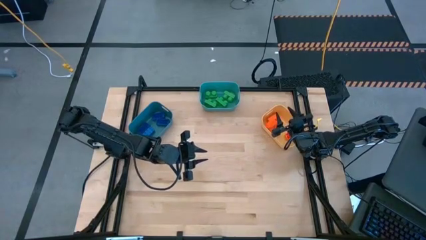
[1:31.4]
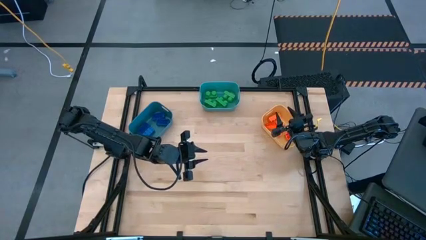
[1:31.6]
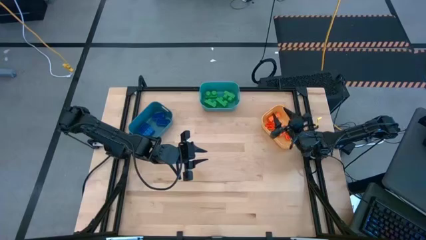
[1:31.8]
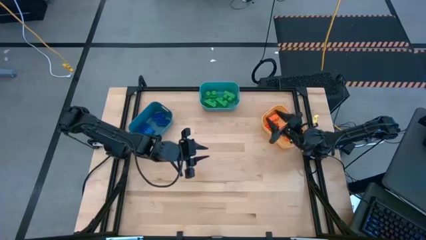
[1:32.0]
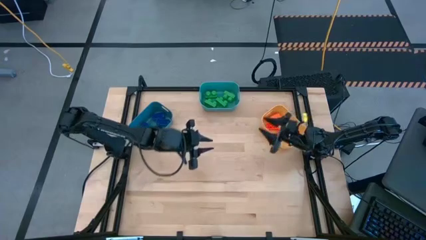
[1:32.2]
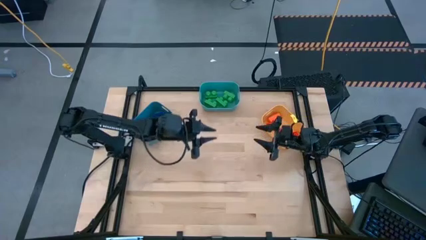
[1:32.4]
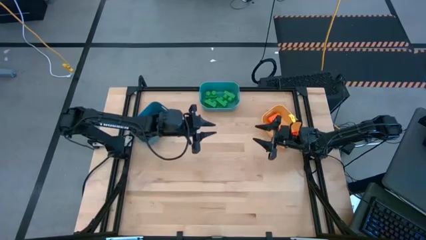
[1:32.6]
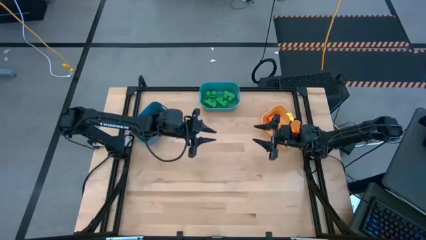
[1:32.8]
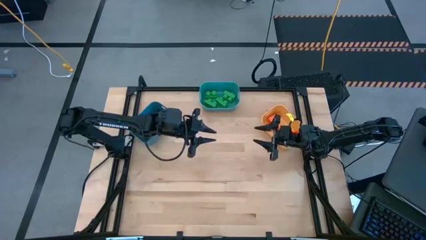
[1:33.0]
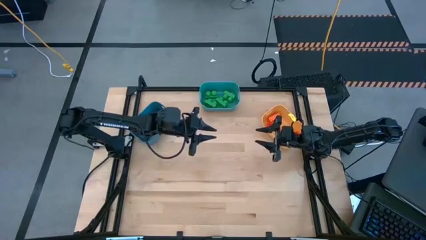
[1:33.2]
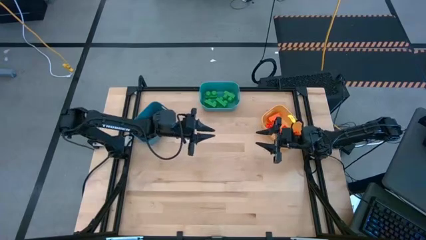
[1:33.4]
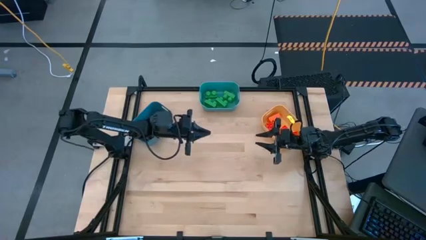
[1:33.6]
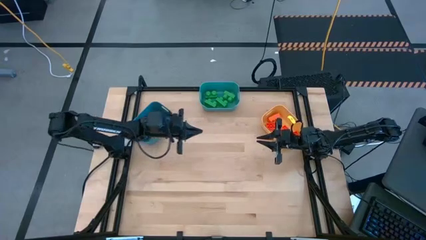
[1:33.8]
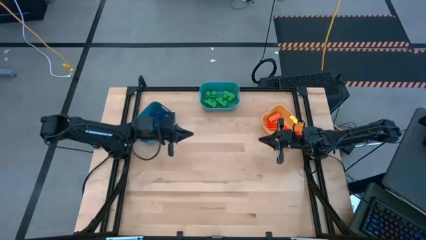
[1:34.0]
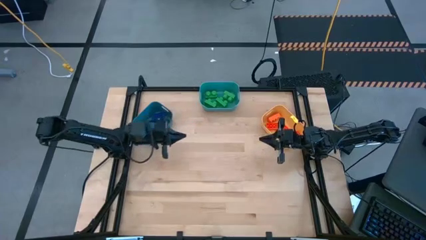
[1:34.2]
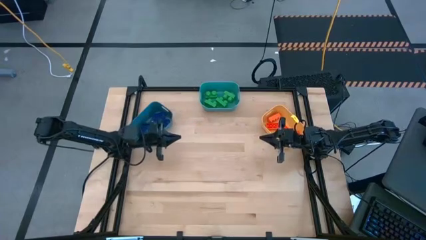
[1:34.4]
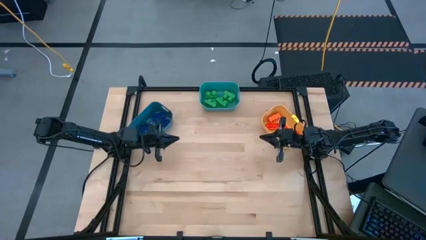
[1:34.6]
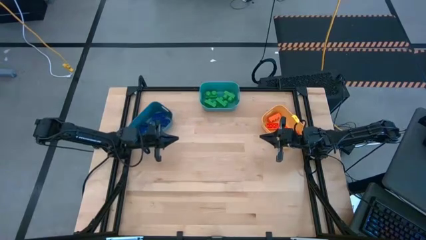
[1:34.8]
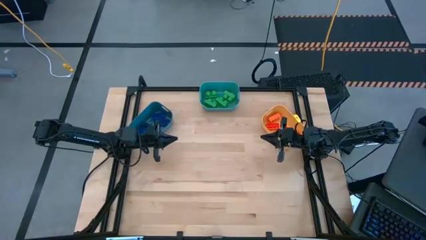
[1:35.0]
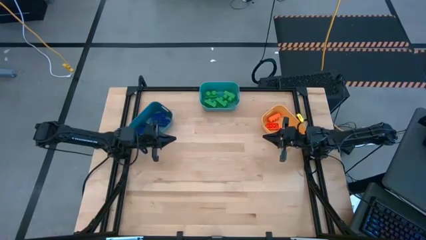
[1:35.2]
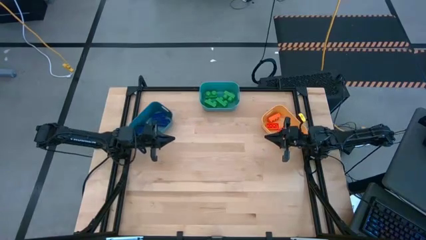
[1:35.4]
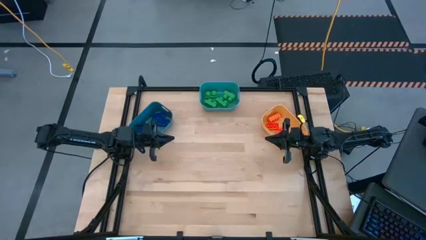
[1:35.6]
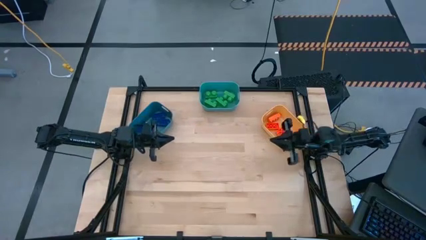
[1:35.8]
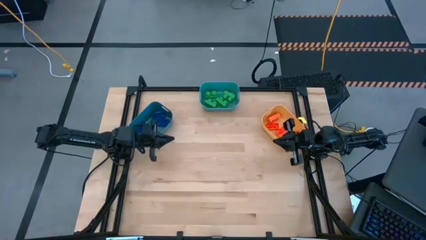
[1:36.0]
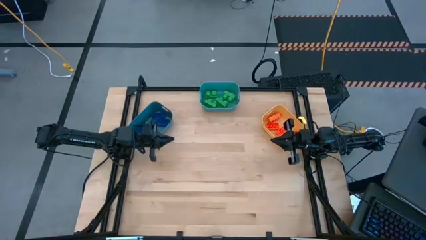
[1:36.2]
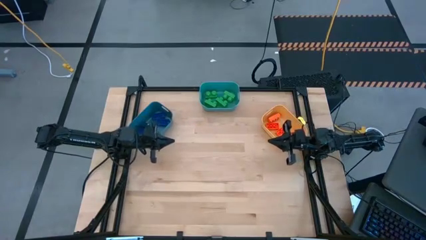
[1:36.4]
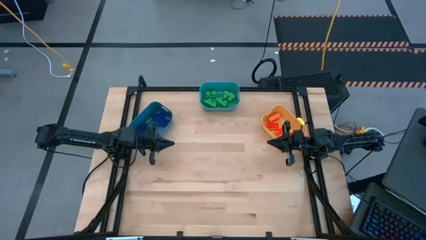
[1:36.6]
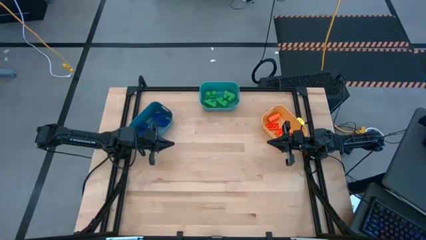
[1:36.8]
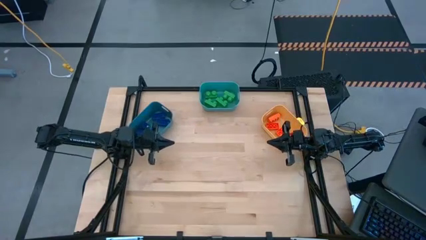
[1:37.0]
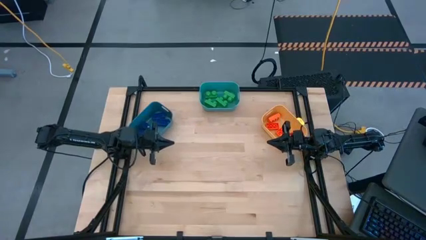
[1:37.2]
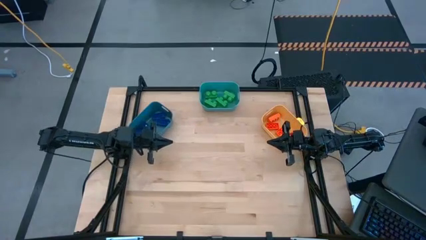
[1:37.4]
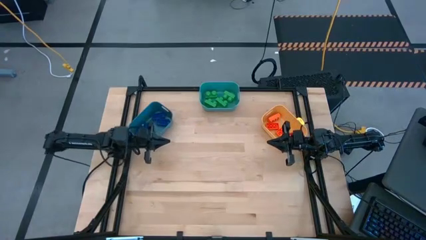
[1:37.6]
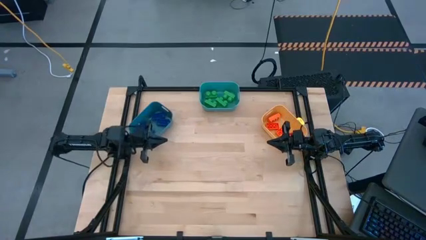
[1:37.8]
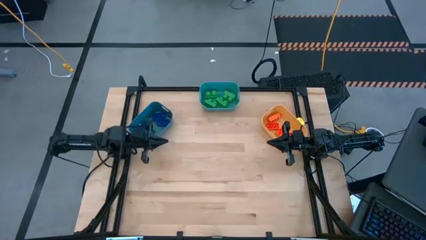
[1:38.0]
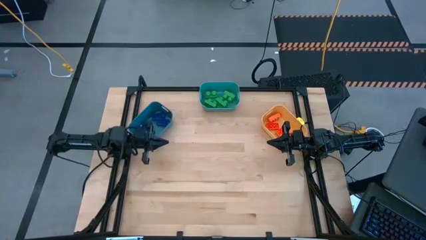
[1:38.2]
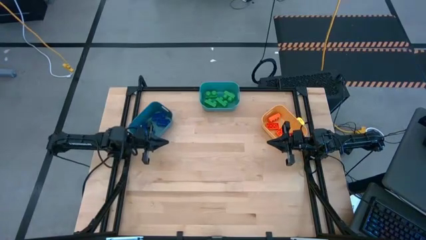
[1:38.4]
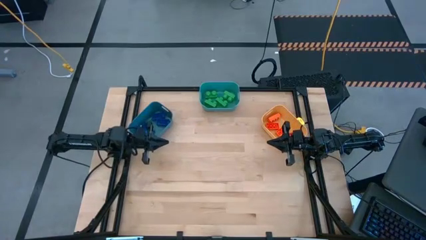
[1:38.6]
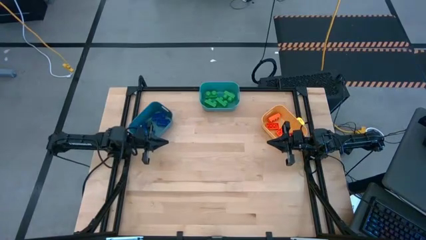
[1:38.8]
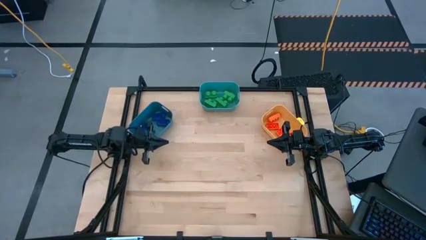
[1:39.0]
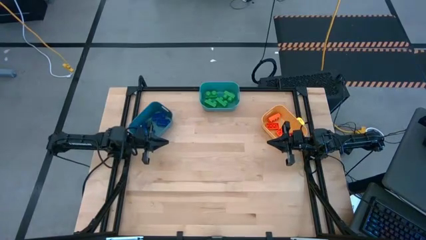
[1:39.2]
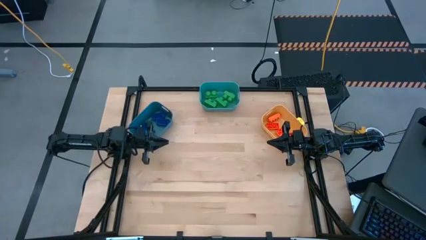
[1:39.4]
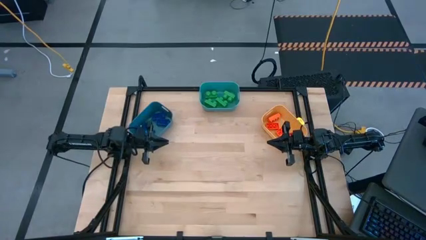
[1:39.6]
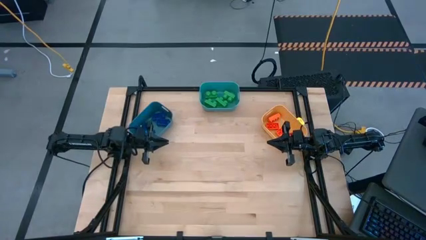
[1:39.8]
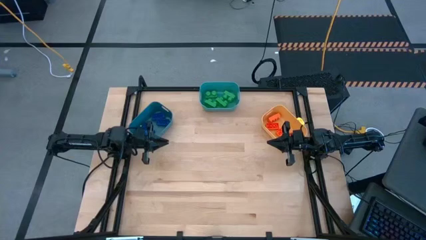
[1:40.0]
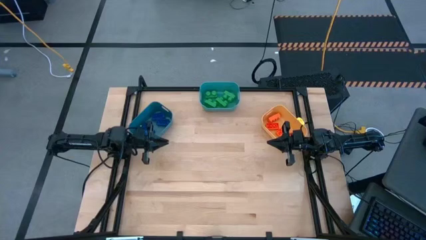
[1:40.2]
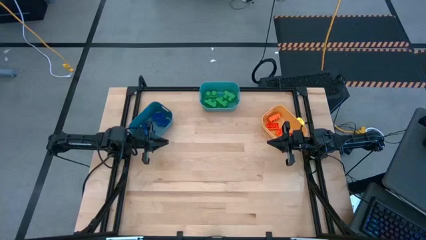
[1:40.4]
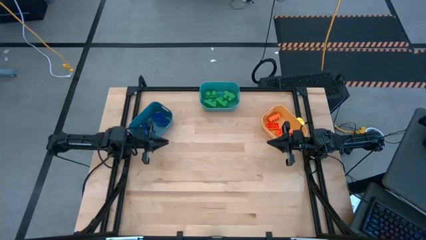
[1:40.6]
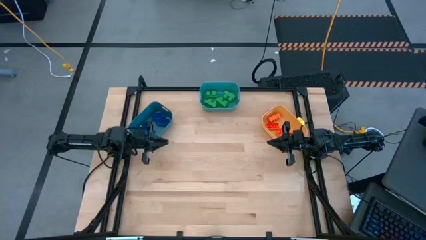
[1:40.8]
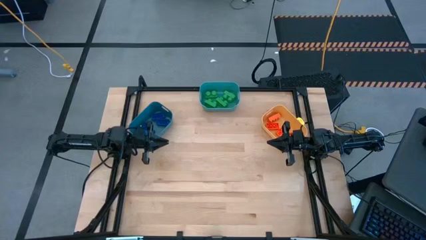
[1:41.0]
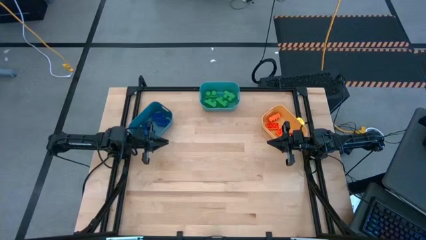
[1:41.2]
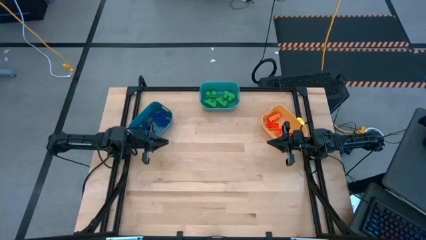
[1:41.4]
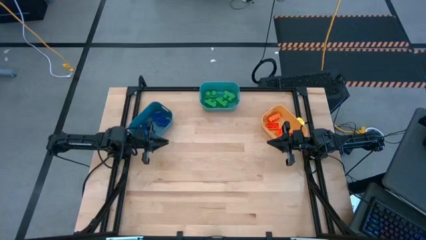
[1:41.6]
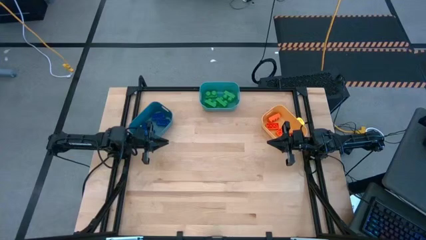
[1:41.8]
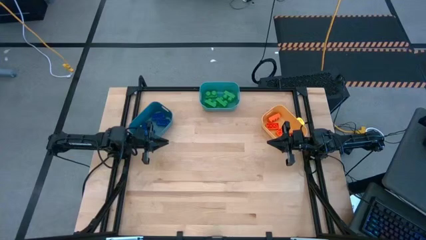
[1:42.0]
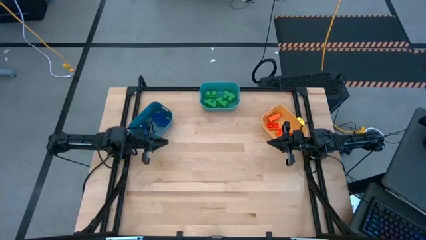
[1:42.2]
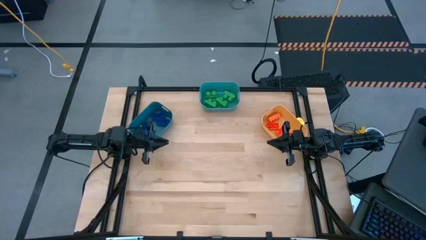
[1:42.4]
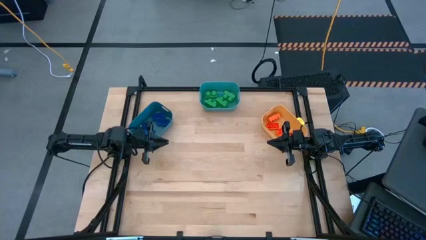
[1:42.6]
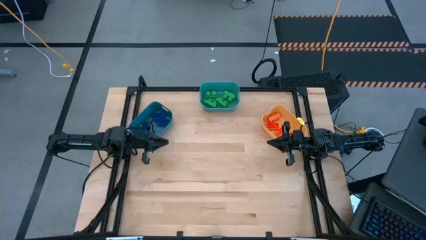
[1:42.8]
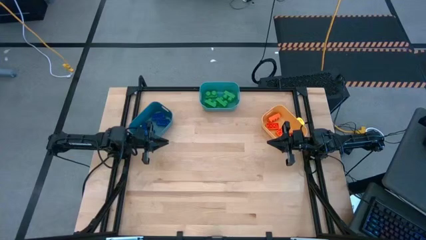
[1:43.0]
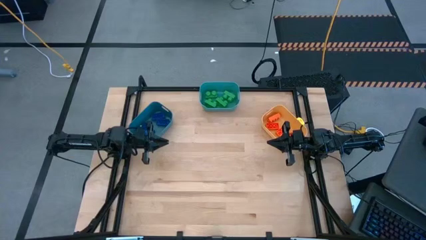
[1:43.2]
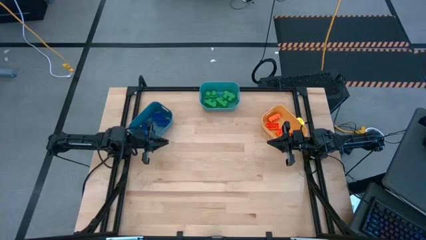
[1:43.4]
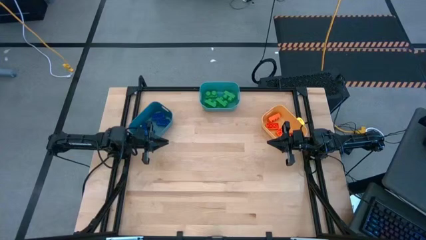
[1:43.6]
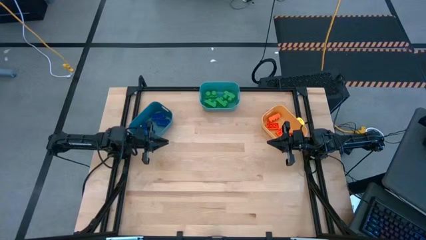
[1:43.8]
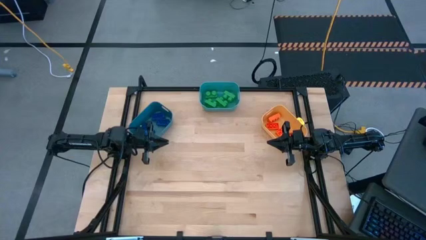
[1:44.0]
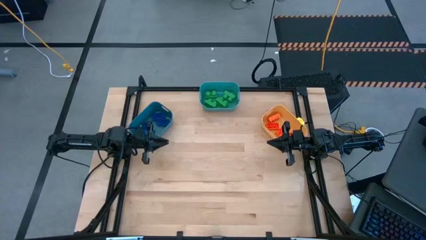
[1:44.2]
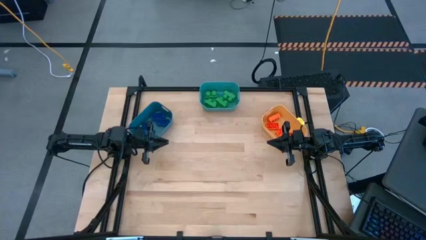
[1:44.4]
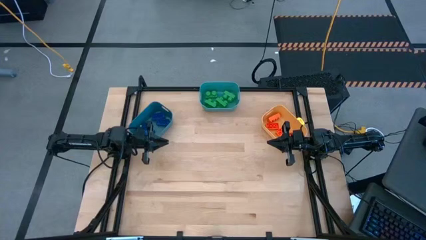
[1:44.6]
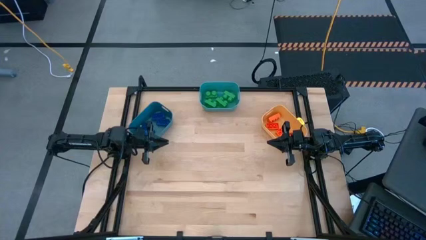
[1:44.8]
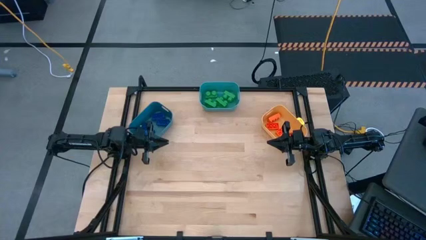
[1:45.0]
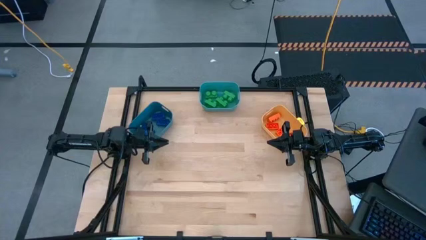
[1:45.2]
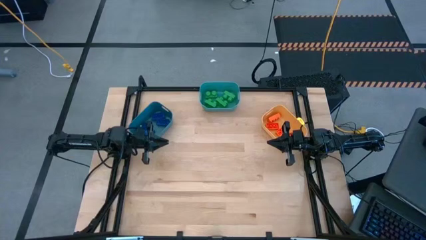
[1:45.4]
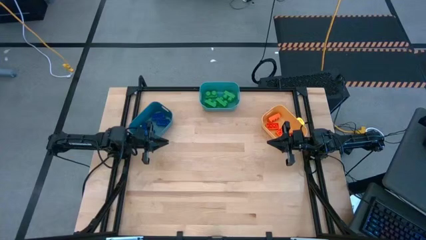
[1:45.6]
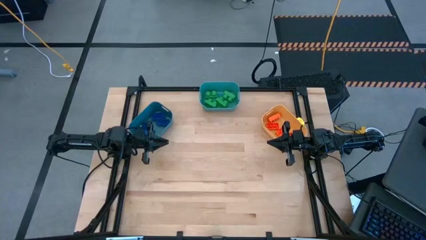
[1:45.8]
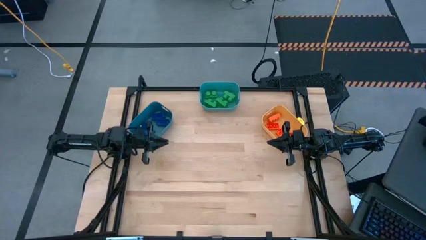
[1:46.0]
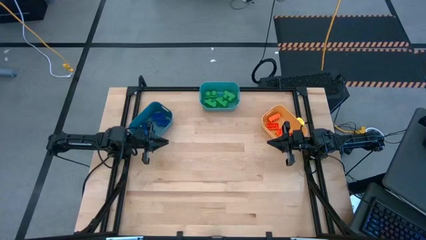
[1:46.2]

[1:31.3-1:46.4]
Task: Sort & place blocks by color
Return to Home Position

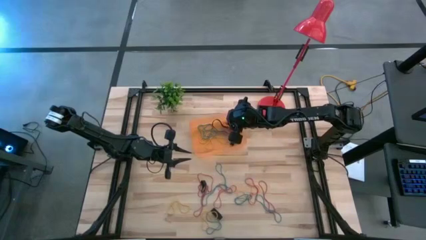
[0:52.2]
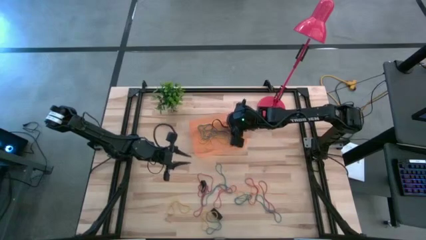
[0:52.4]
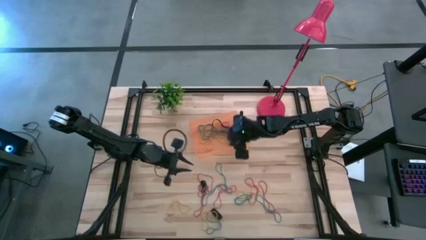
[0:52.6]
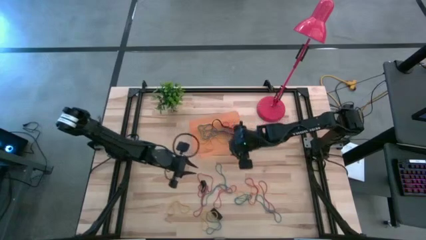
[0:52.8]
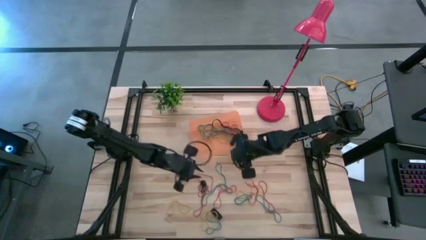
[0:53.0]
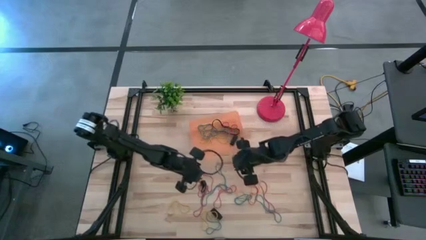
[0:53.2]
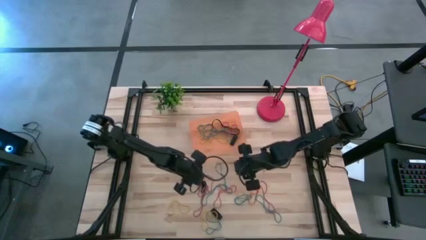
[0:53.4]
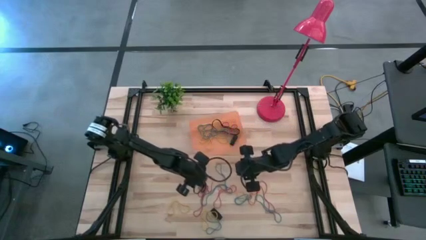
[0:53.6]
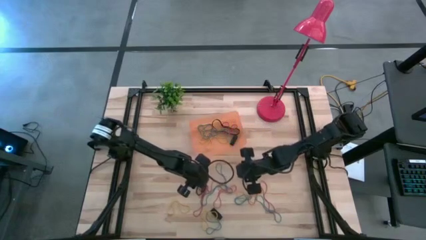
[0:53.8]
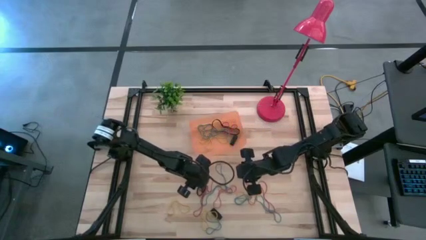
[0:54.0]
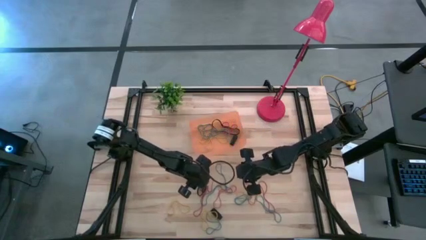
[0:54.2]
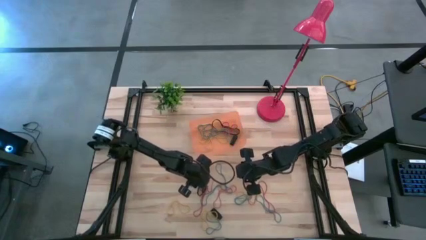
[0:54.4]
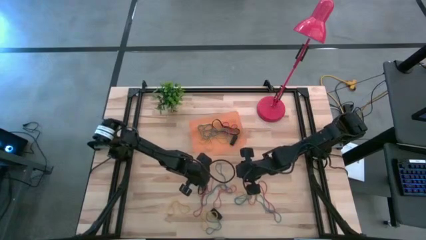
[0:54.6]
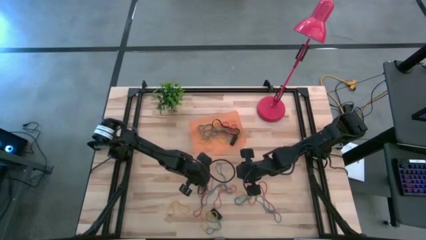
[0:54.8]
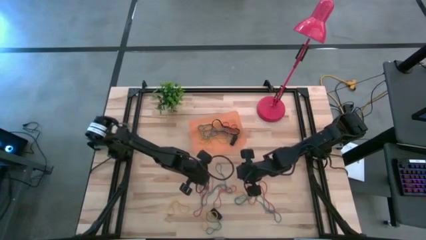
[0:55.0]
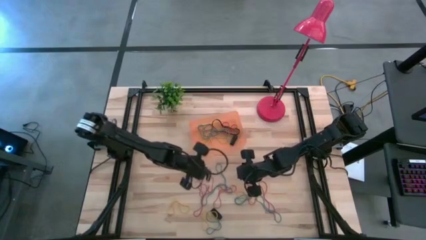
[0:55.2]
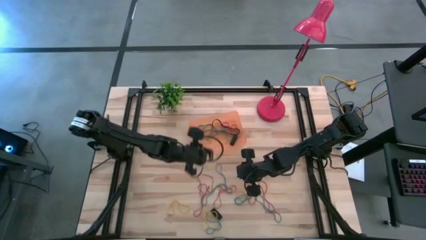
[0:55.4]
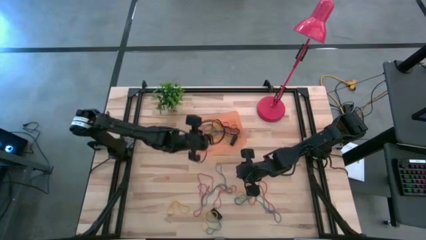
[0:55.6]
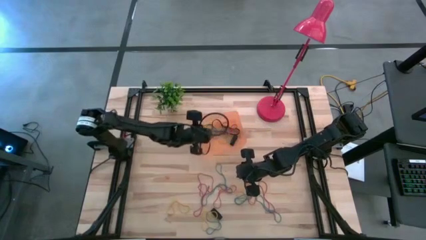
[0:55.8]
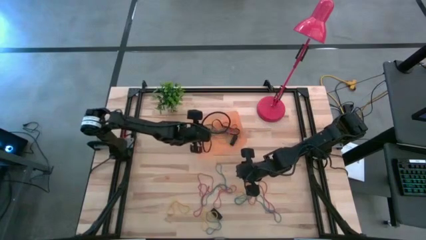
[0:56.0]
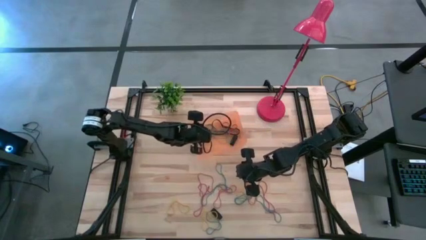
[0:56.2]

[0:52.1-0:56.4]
Task: Pick and place rubber bands into bin
Put the black rubber band into the orange bin
